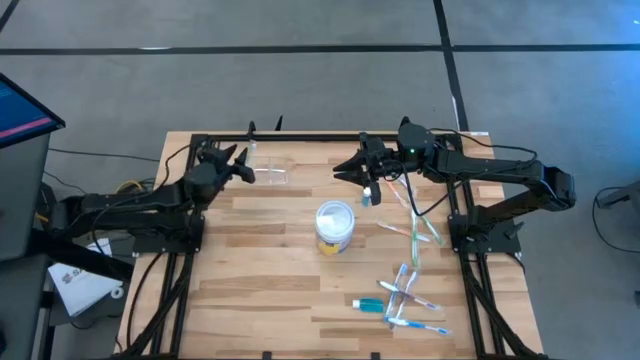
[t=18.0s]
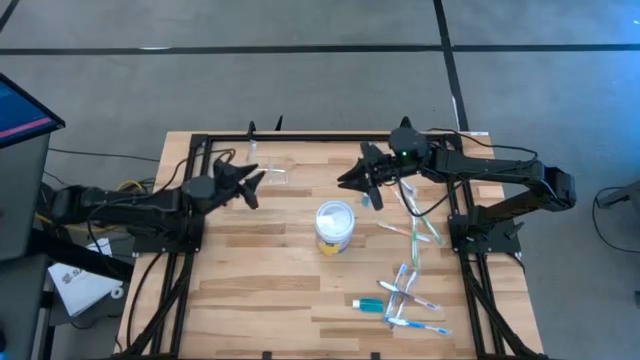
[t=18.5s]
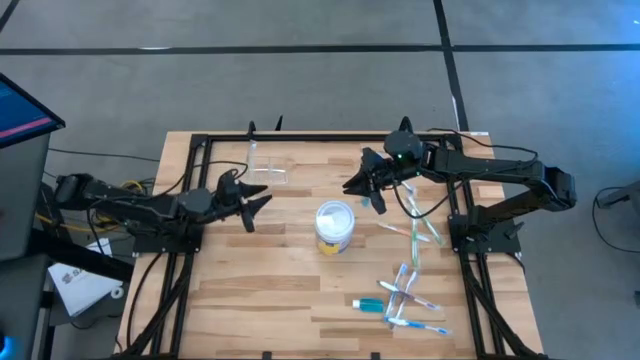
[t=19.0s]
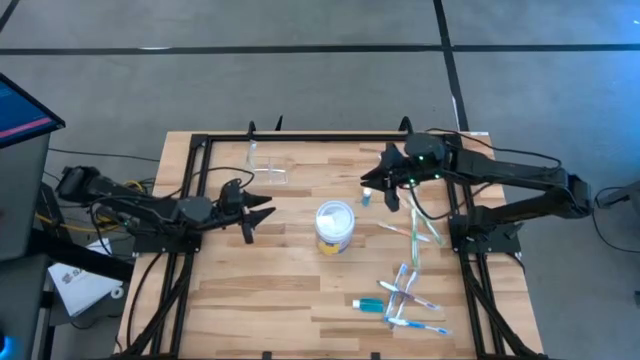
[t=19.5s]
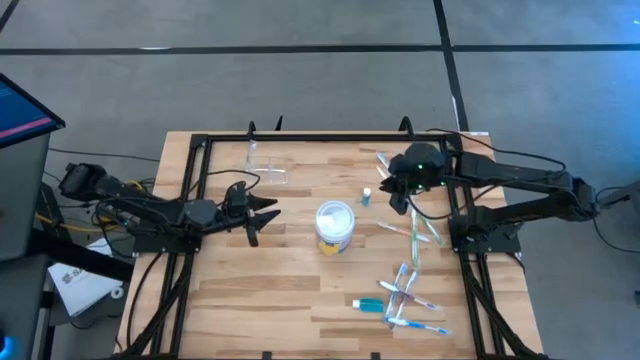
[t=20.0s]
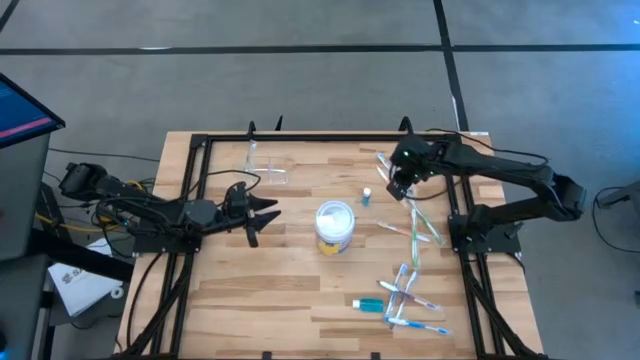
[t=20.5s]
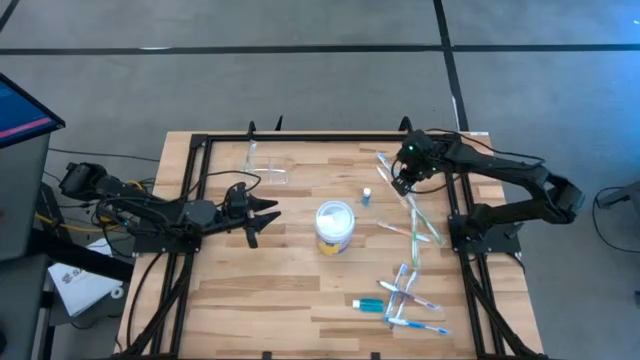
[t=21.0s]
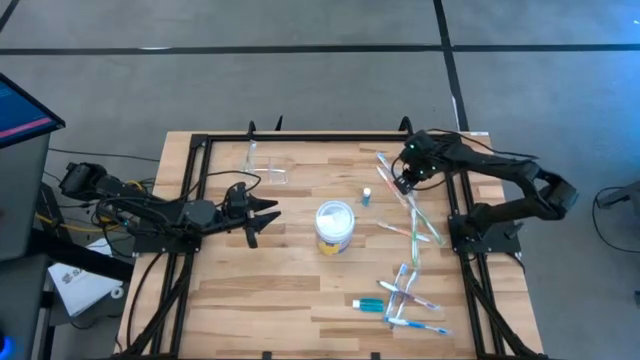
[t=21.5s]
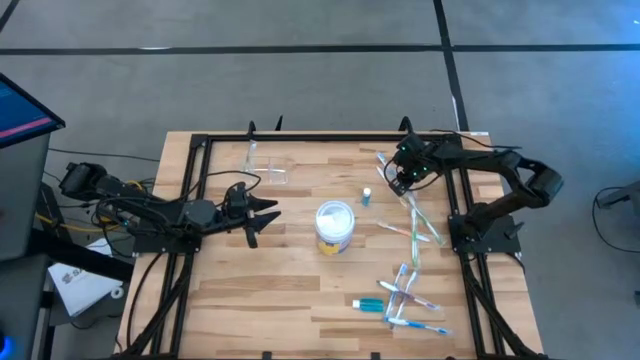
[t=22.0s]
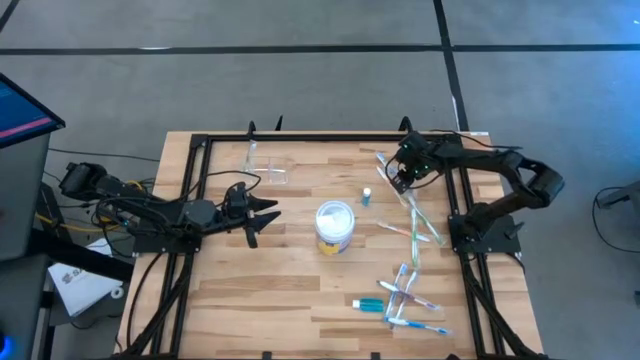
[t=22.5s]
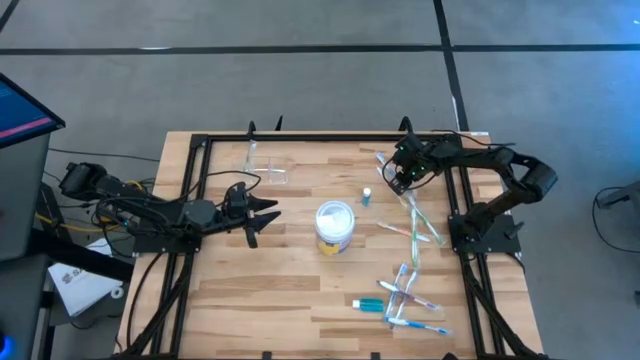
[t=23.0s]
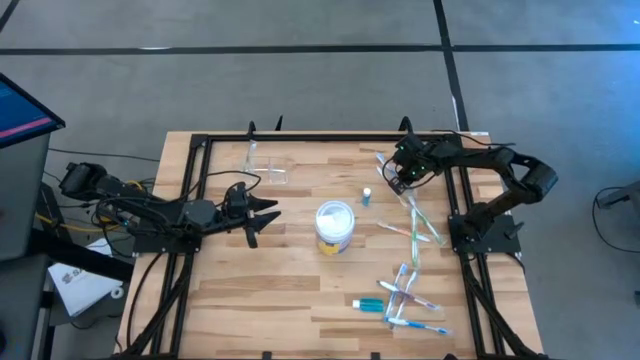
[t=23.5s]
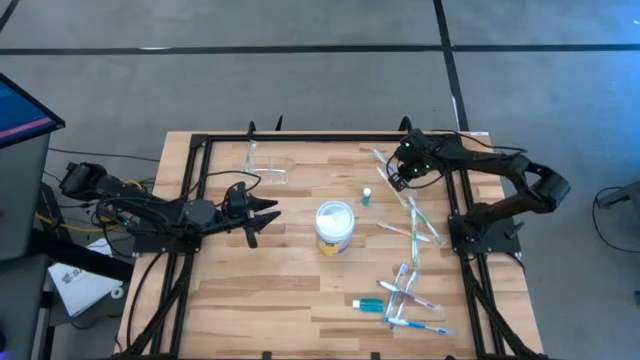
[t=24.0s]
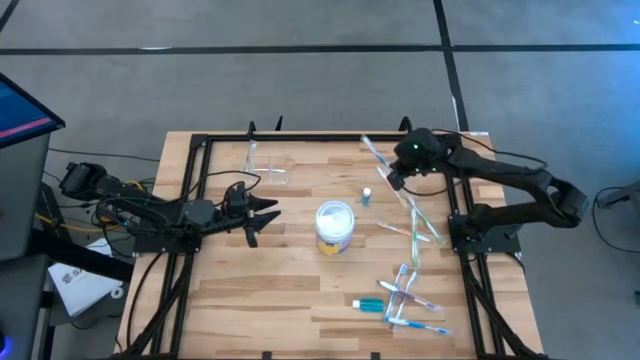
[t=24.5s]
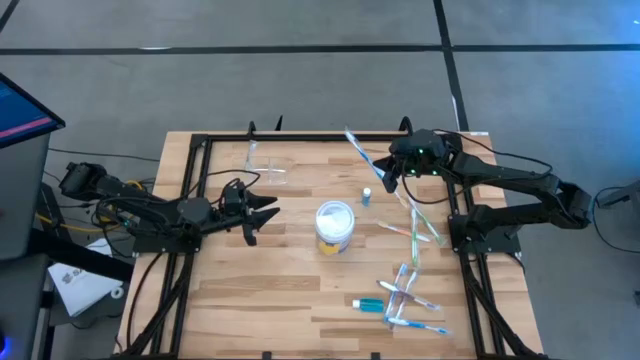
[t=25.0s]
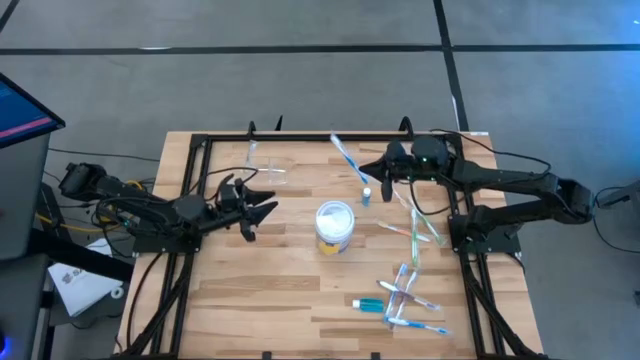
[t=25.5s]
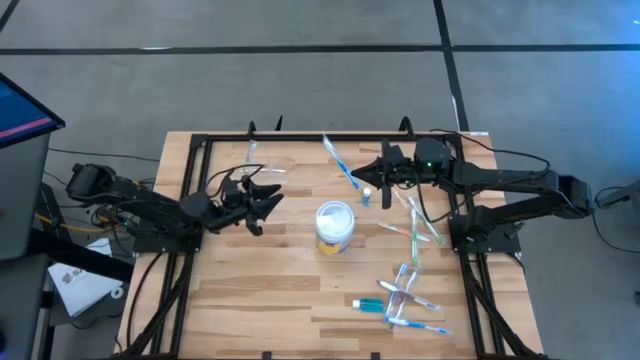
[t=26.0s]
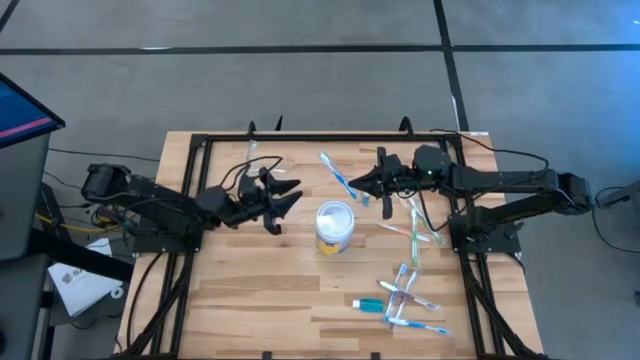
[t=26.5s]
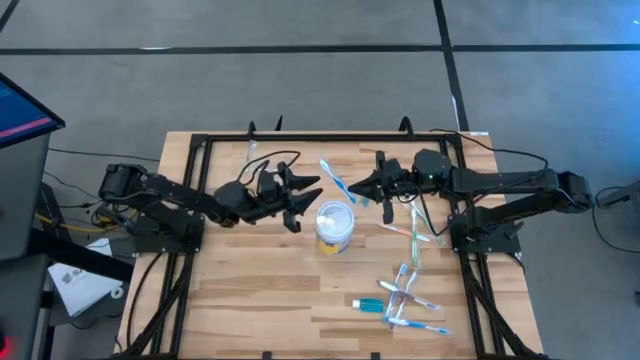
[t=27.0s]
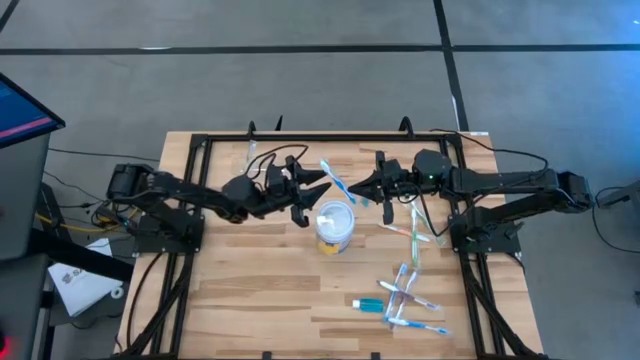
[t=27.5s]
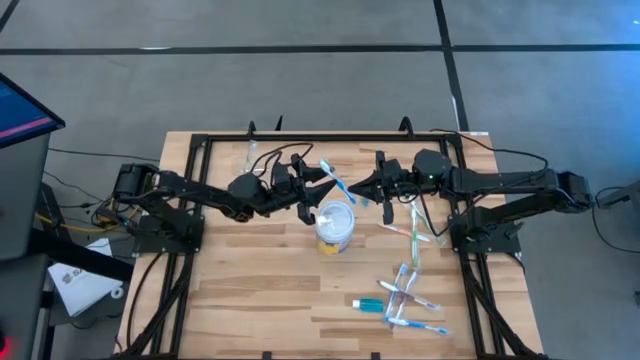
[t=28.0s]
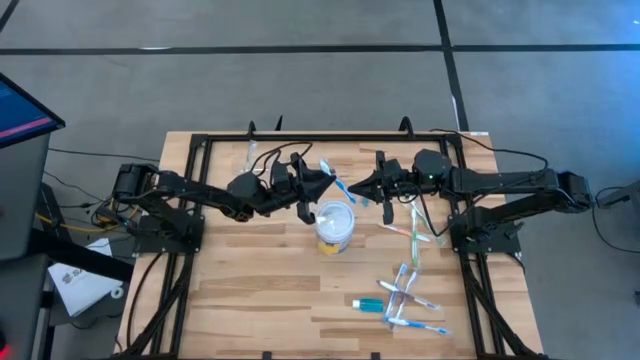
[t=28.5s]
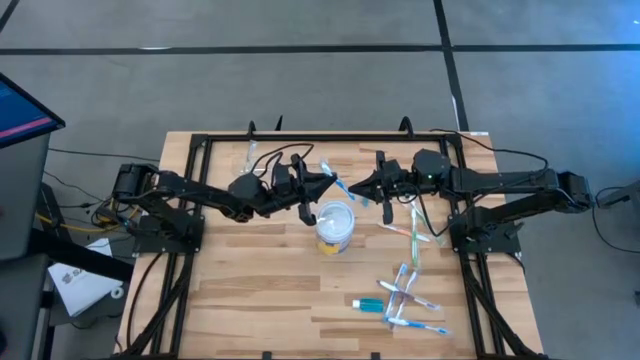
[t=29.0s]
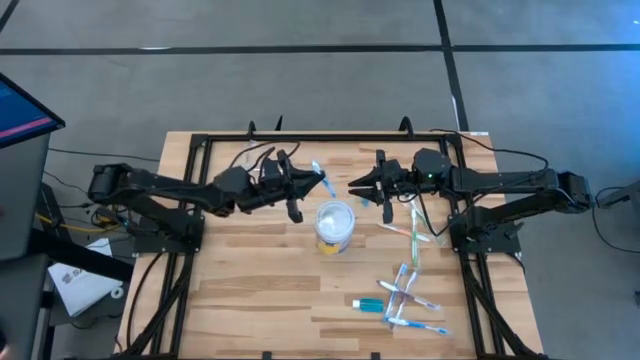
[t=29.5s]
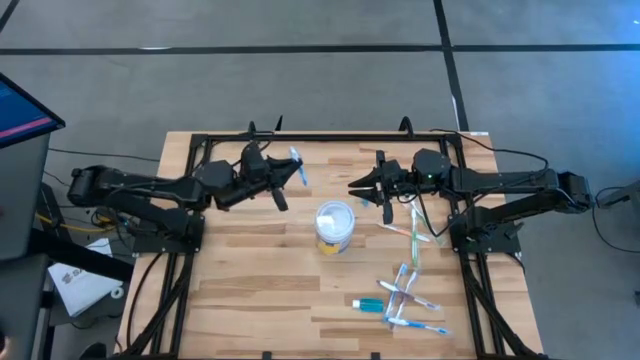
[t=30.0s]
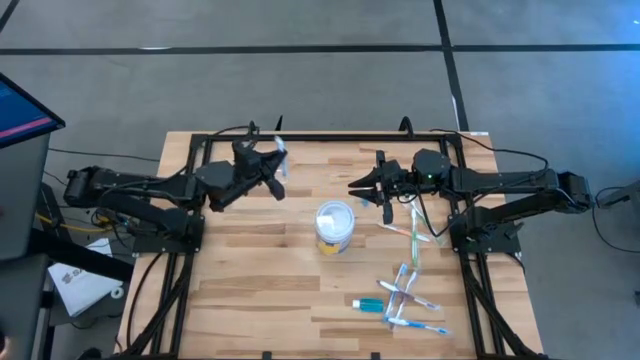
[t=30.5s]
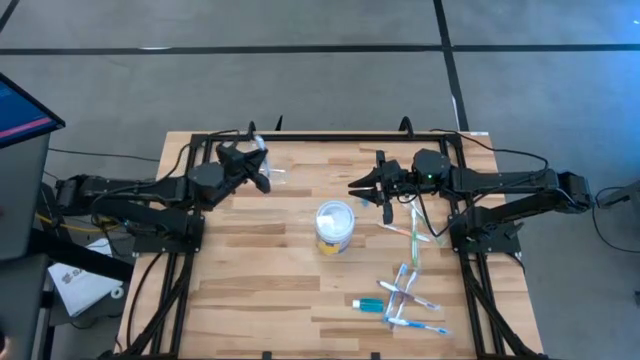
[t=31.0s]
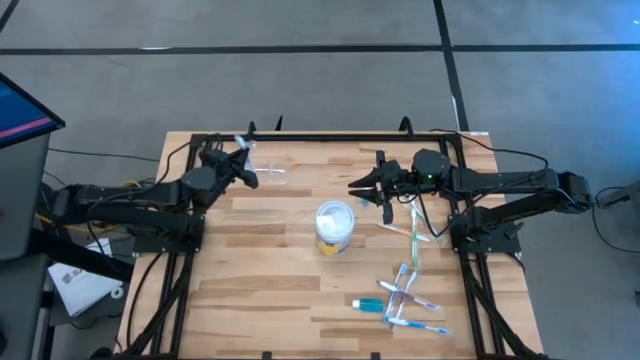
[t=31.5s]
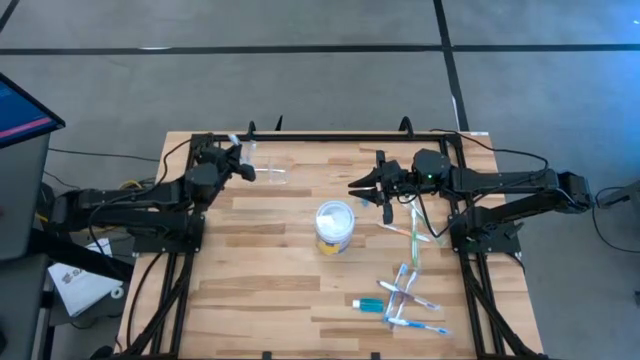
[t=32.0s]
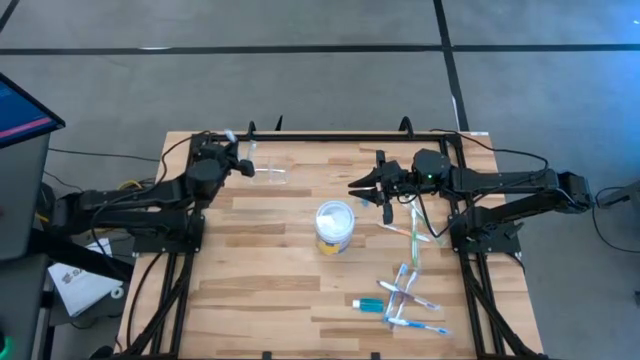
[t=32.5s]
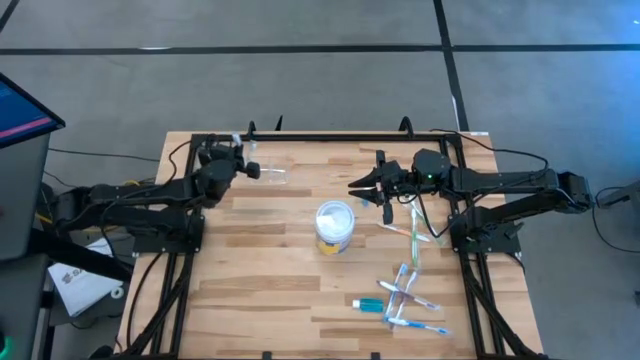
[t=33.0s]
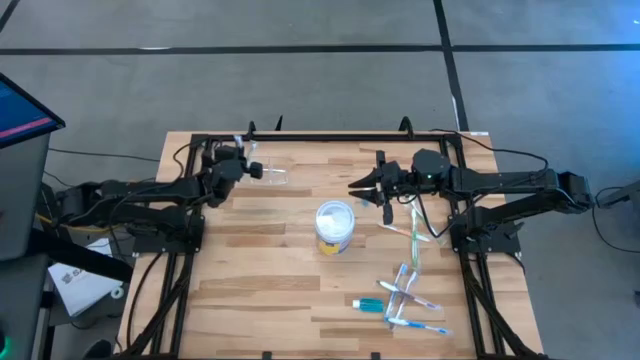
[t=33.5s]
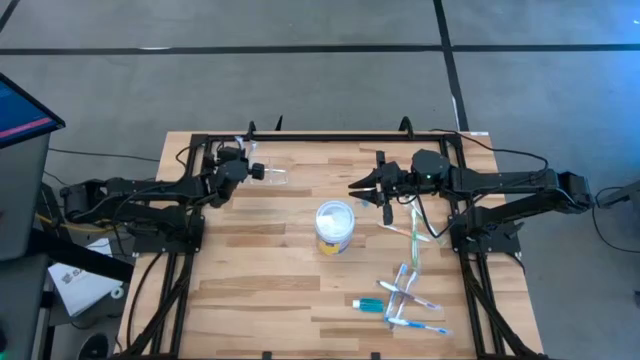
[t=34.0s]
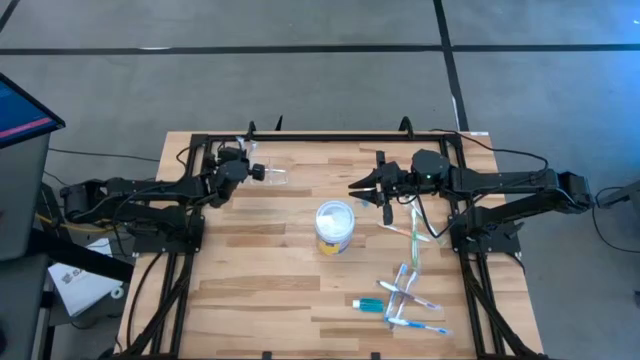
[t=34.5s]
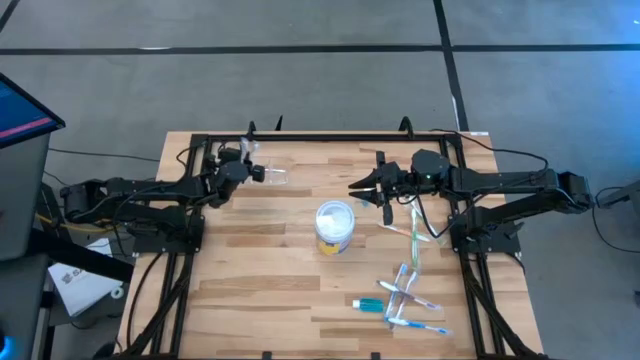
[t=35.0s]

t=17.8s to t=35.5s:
Task: Pick & Place toothbrushing station
Put the top blue toothbrush into the transparent organizer

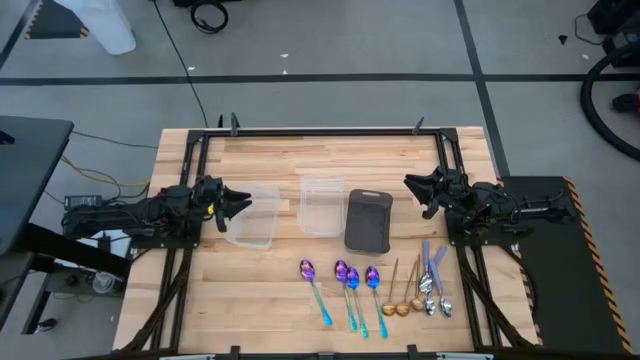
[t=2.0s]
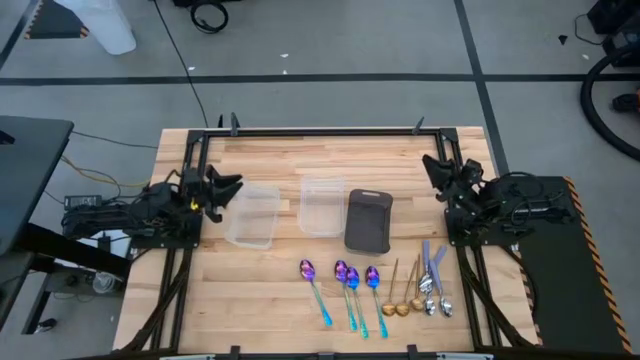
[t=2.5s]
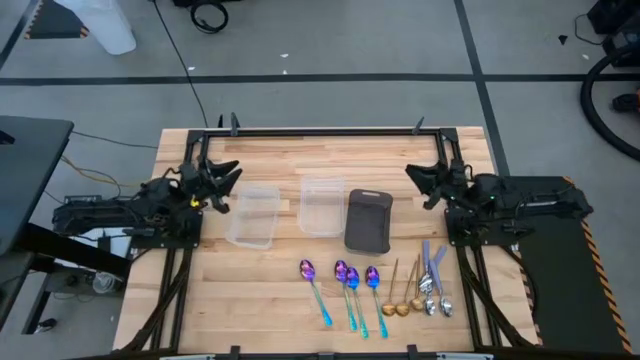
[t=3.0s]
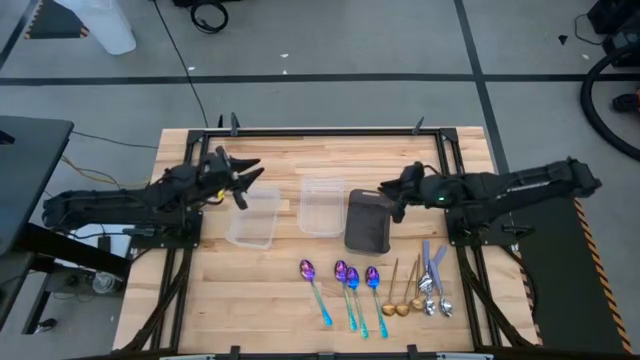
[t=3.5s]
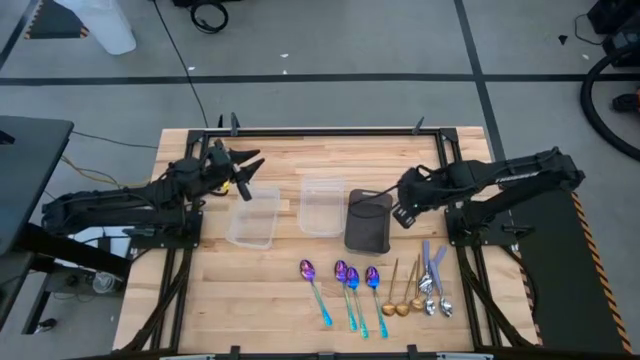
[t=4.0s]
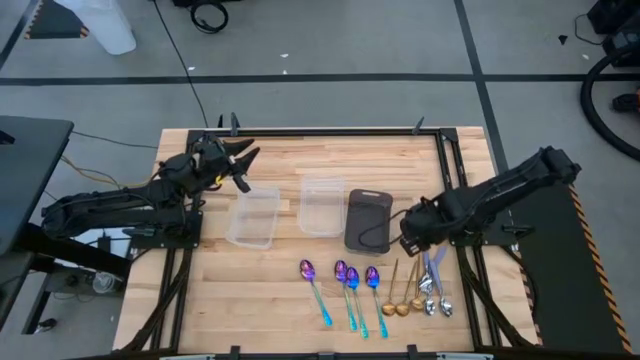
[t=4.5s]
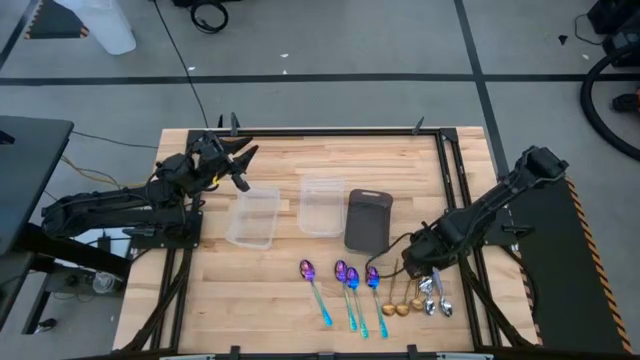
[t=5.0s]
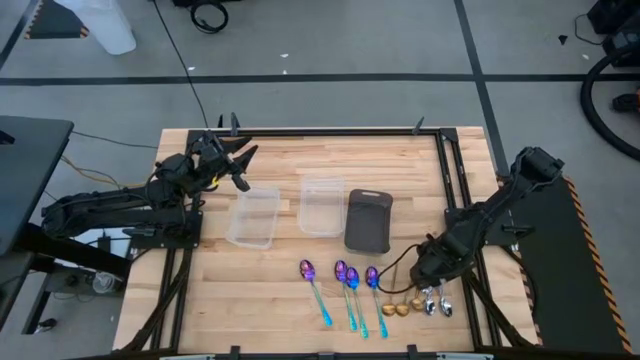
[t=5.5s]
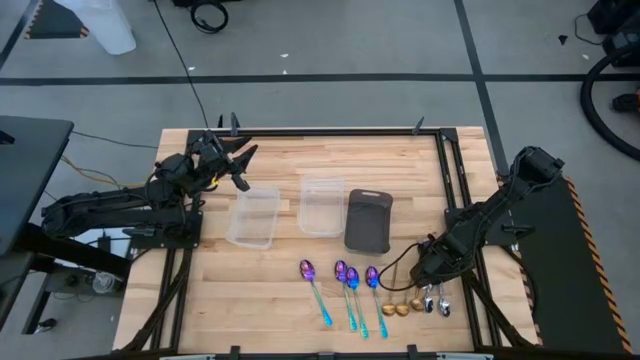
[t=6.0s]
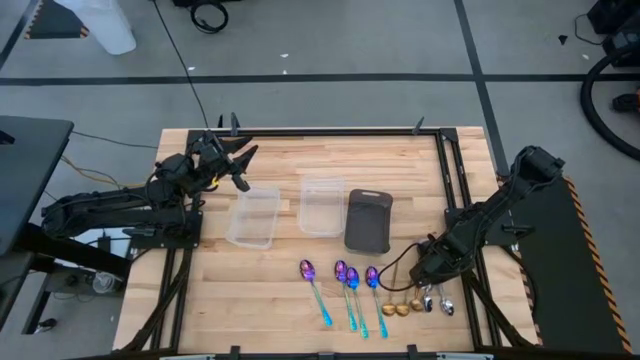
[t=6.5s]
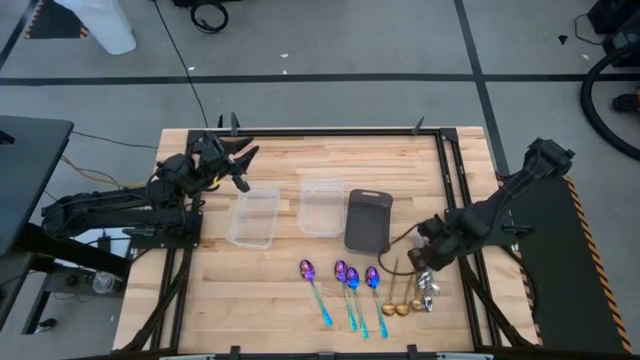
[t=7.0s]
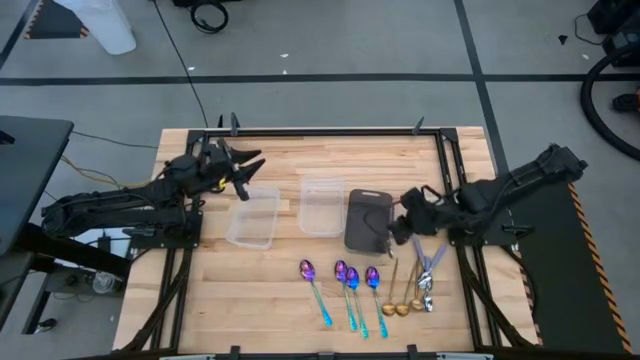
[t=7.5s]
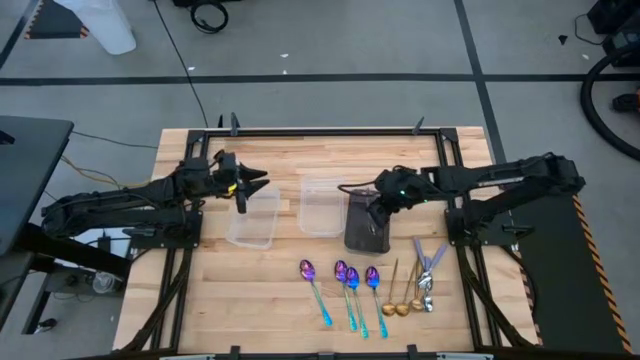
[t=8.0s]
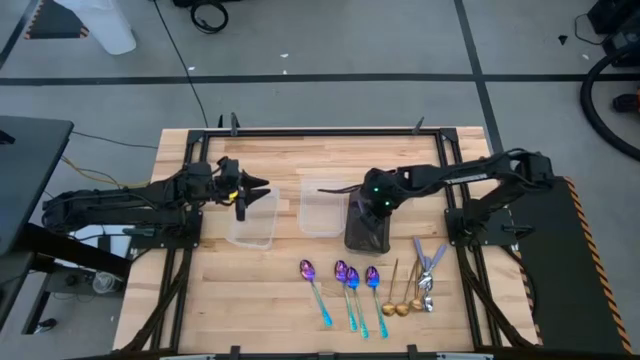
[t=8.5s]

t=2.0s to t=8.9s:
Task: Sort silverware by color (type)
Put the purple spoon into the black bin
